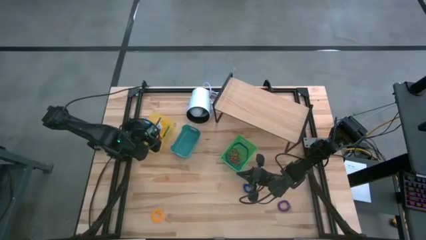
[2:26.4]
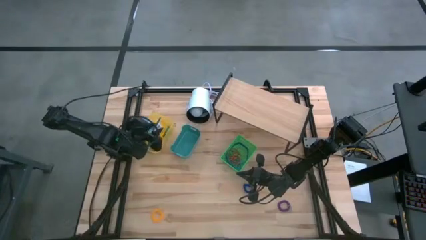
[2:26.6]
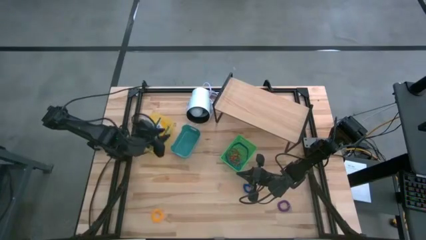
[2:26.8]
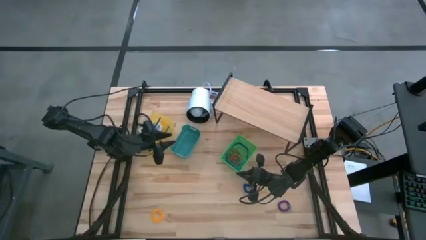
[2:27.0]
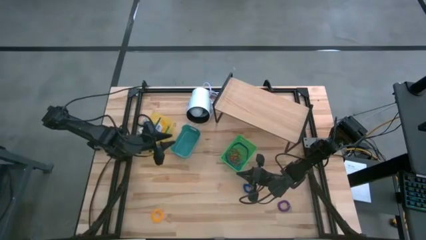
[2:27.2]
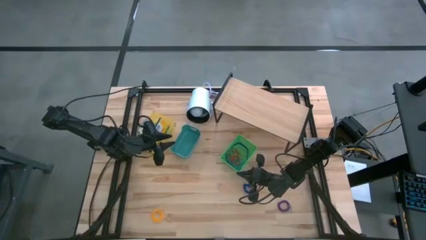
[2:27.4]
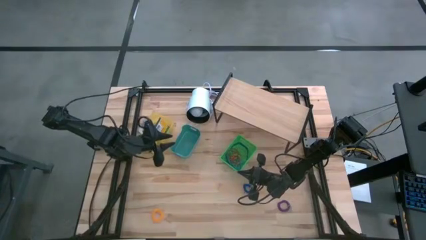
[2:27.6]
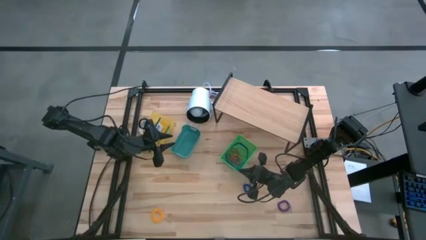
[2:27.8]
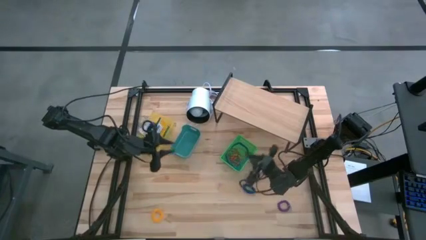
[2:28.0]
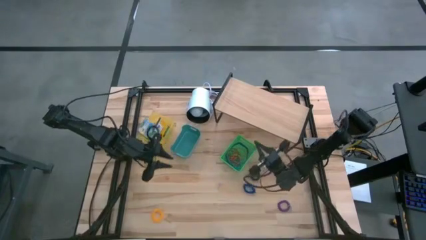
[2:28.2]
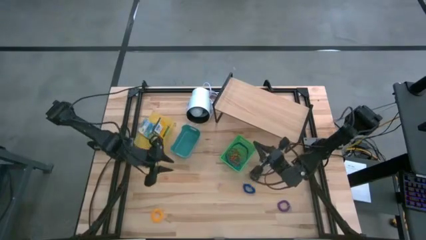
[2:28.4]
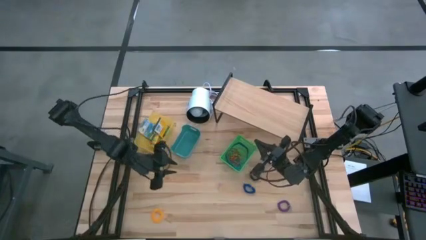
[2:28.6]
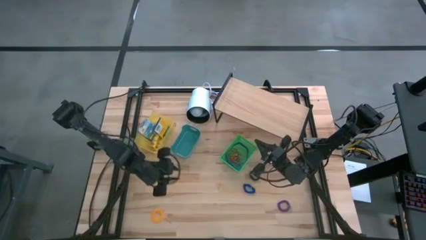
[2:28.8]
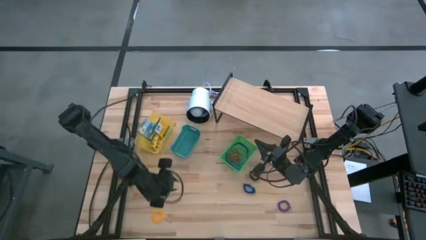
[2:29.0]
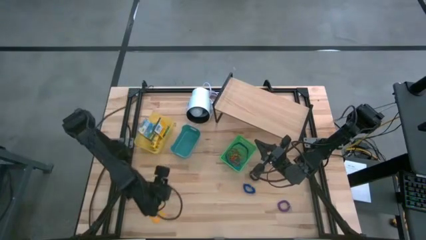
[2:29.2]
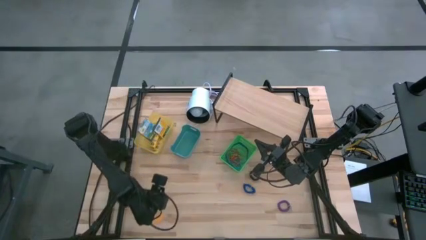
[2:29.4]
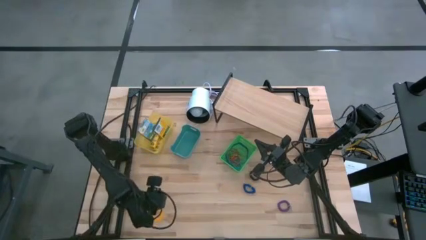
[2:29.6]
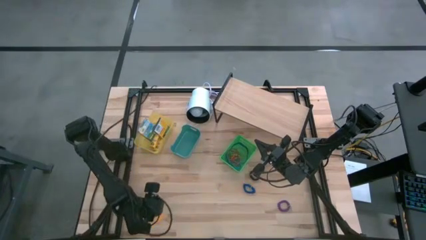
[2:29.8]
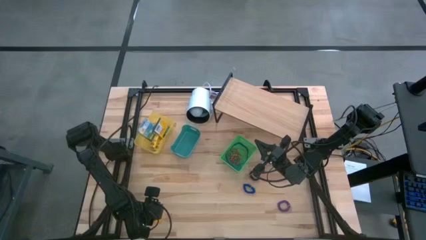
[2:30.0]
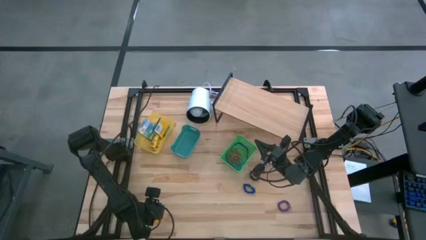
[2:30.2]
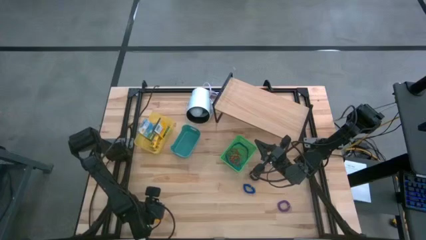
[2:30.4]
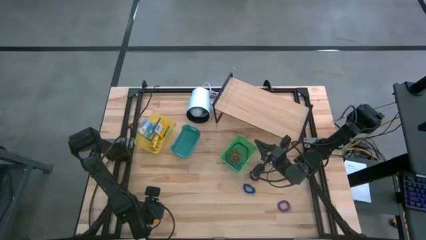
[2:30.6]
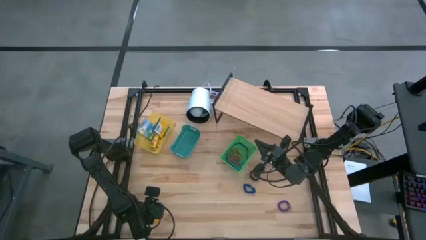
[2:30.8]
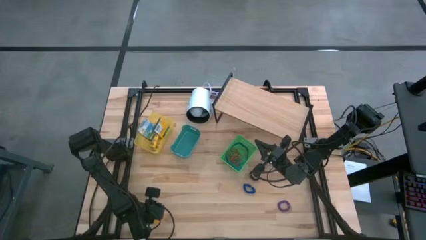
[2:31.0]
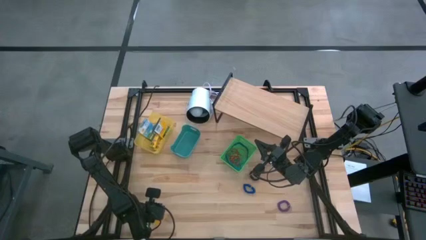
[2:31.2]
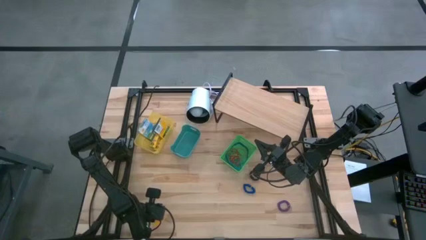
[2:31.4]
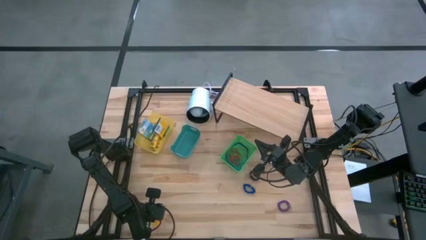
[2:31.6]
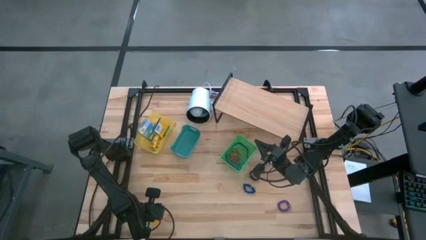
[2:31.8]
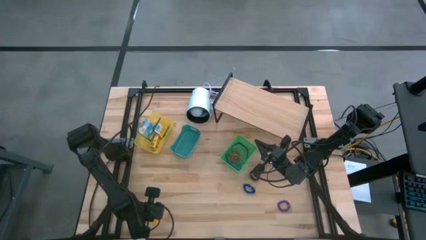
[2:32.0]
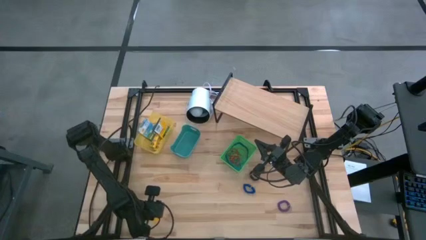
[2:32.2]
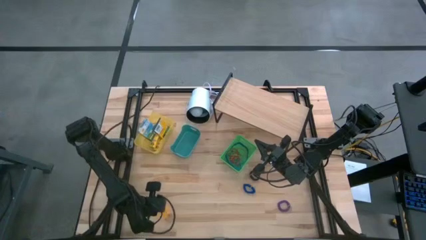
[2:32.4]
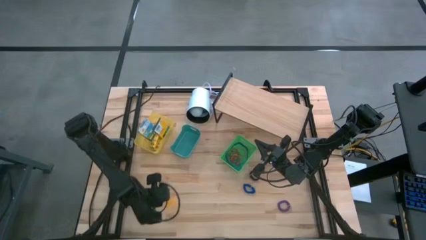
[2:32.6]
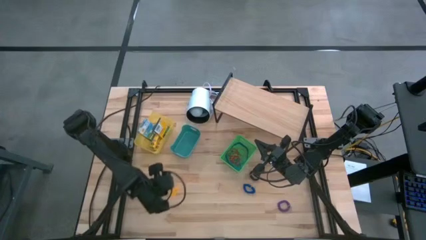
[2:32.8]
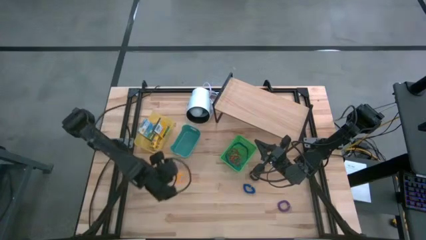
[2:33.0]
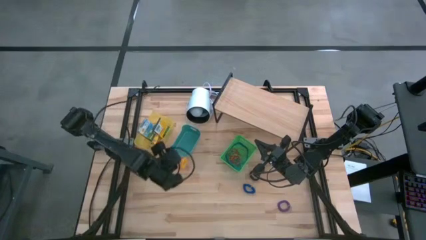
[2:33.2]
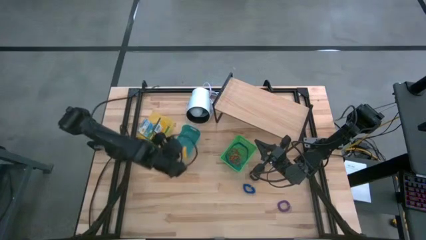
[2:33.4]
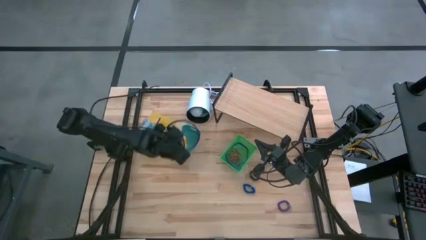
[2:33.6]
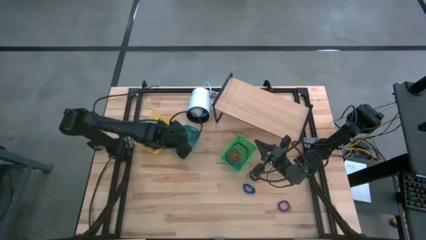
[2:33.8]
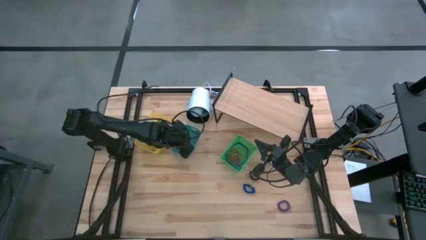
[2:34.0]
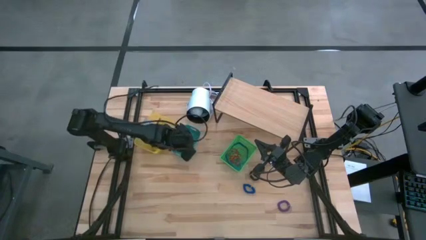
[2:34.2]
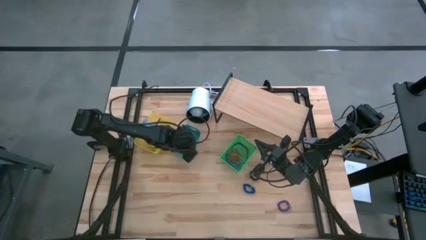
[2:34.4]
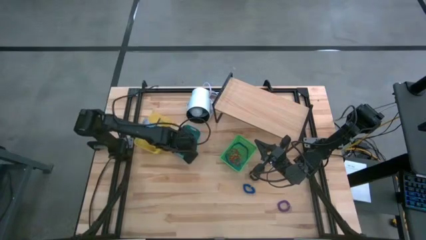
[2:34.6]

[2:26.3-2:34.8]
Task: Pick & Place Office Desk Supplies
Put the yellow spring keychain into the blue bin
